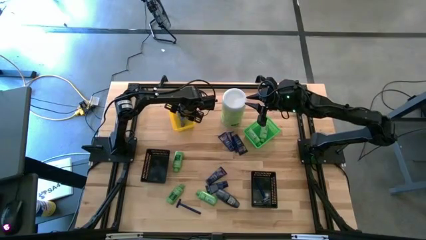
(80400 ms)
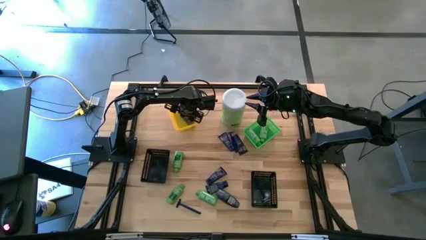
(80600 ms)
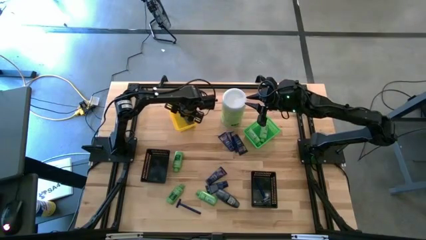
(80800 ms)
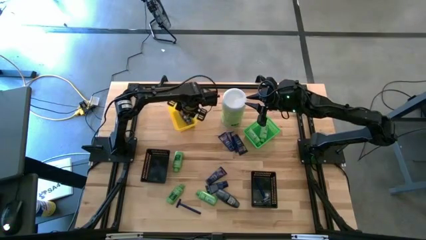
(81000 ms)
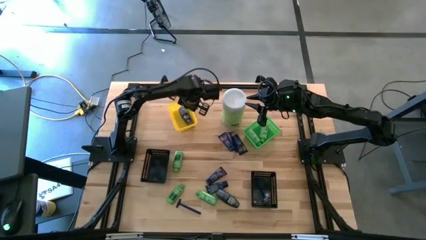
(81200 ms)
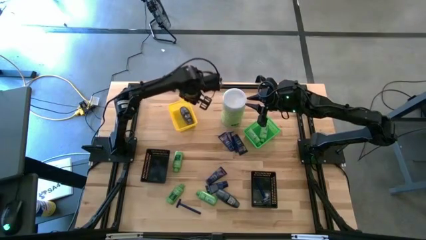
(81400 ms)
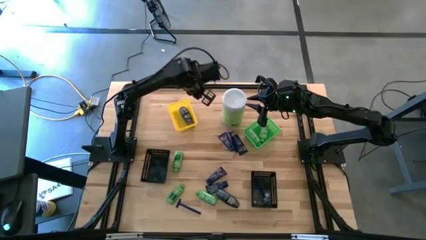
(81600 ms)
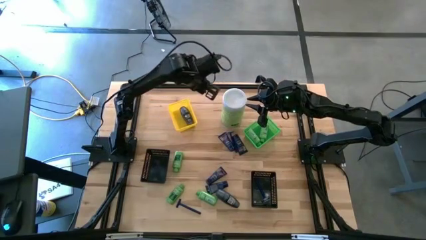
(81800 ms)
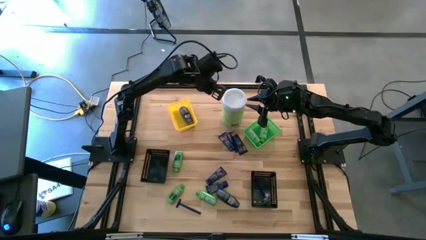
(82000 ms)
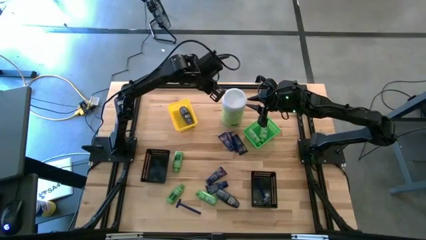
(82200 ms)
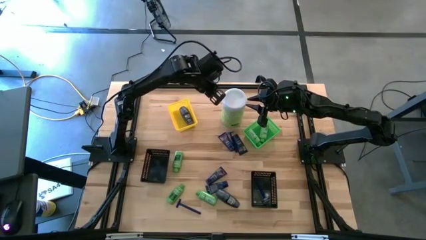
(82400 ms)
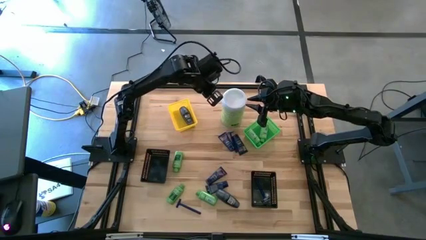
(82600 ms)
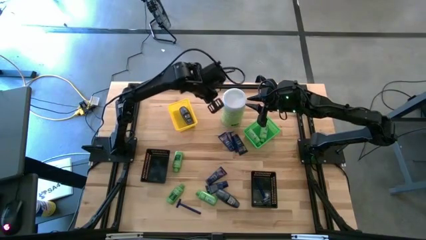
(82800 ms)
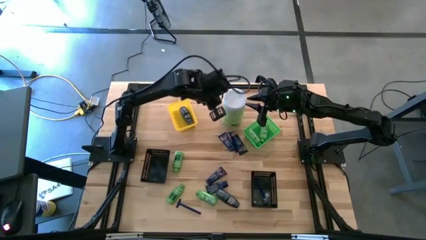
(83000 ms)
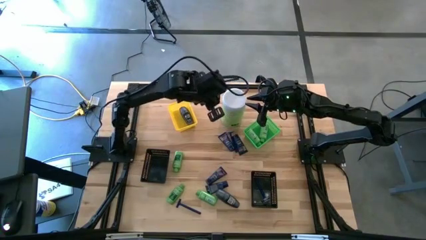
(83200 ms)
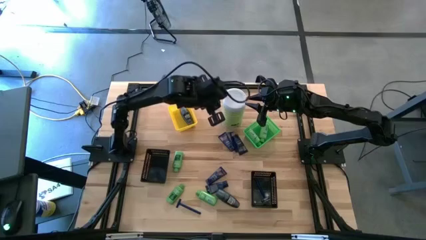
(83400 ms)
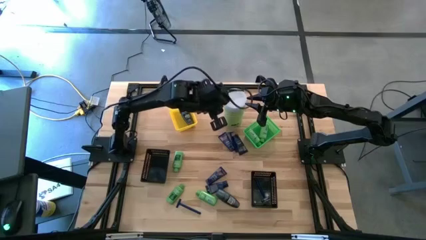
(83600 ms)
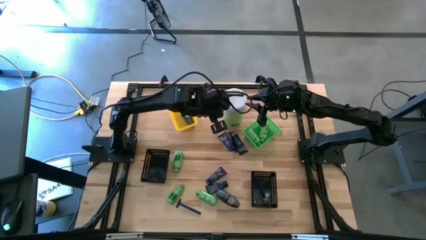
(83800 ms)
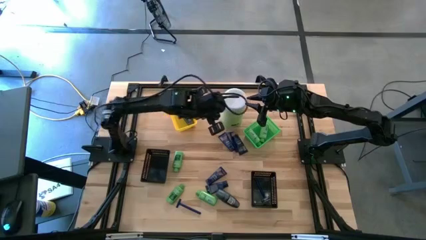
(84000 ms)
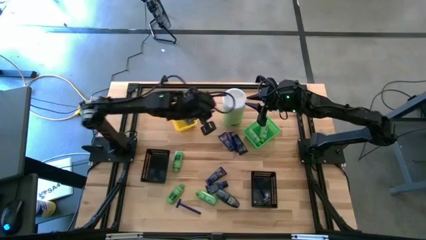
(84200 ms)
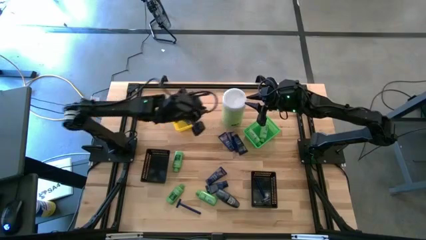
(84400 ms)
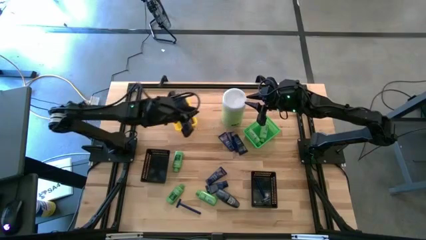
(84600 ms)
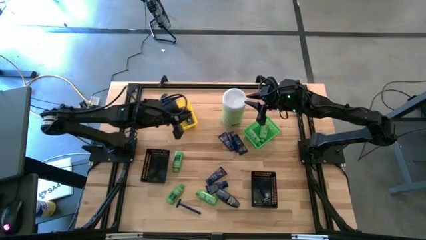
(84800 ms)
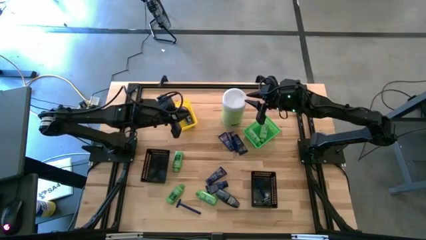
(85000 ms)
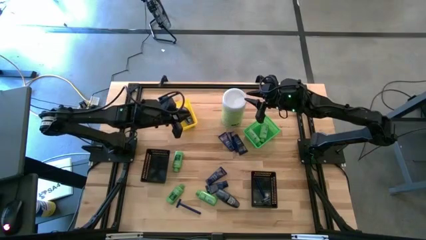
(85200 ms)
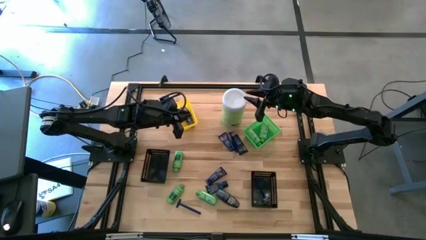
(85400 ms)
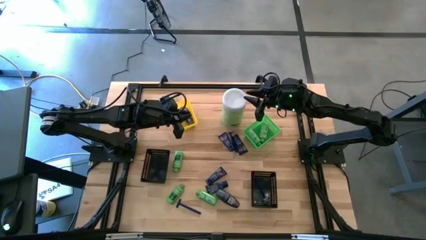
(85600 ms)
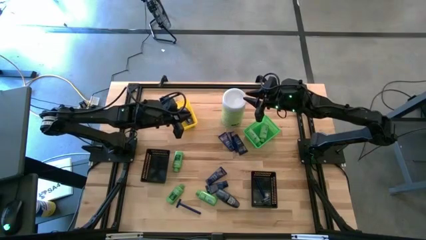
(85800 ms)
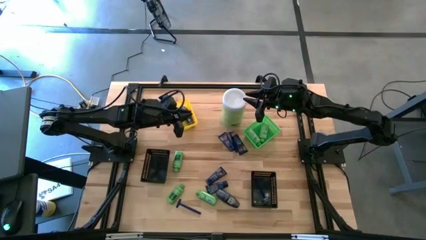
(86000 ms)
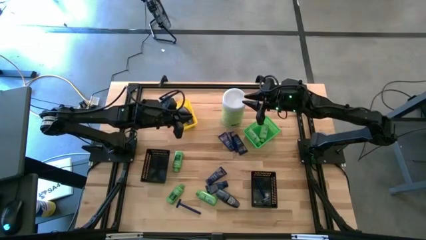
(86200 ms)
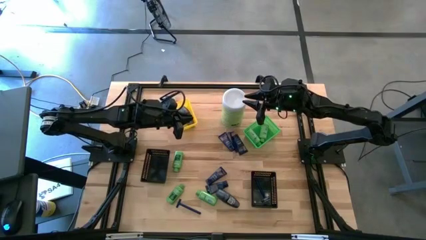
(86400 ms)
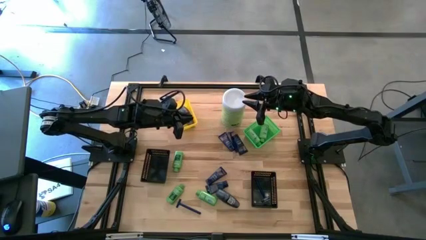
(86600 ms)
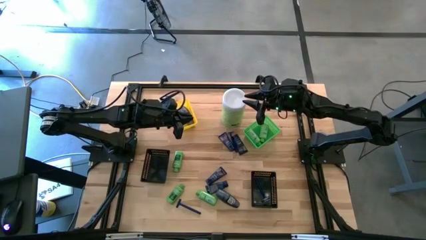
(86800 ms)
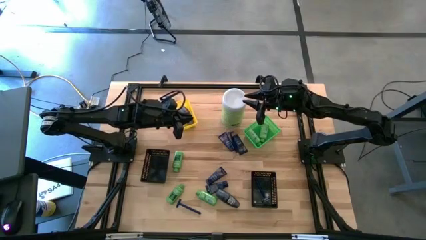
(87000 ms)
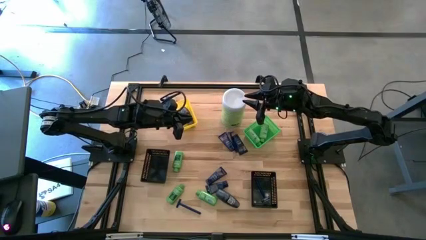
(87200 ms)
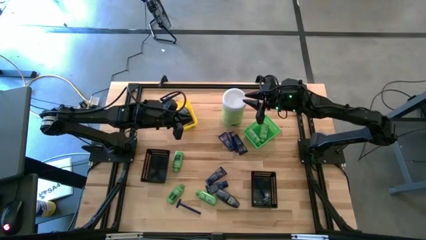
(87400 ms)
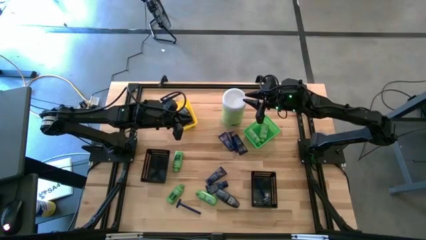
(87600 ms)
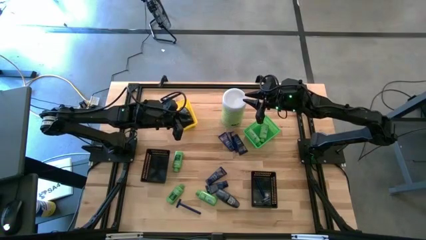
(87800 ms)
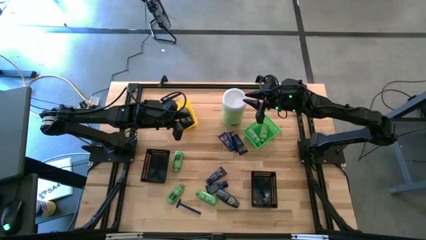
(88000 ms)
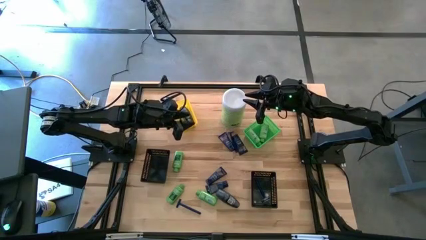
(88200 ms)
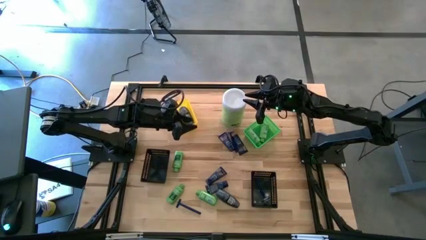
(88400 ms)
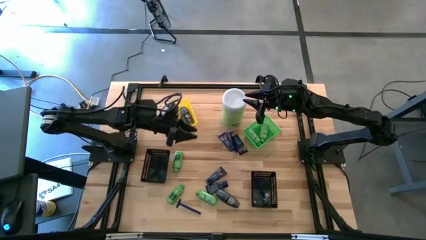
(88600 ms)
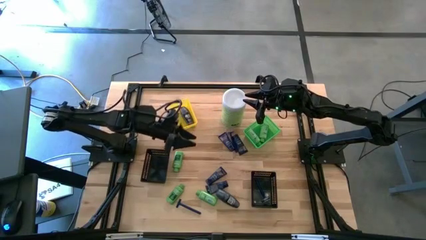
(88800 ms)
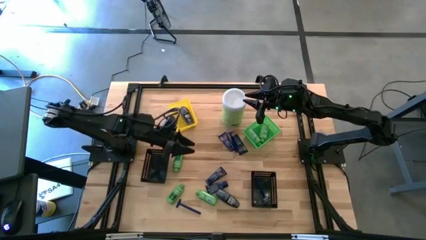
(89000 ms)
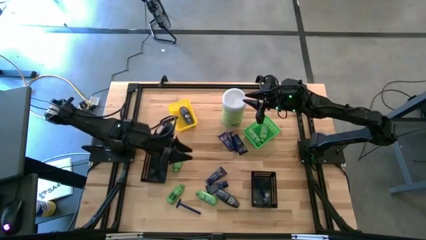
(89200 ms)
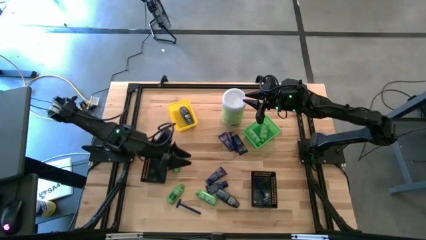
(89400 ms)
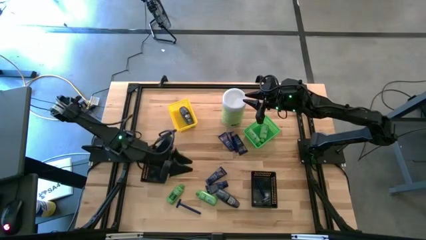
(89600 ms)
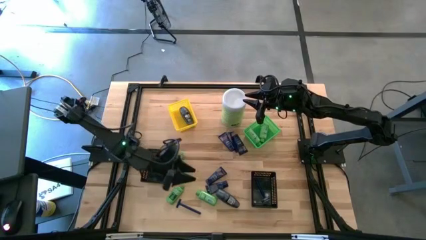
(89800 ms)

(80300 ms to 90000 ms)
Task: Pick & Place Travel size toiletries
Put the bottom blue razor into the right black bin

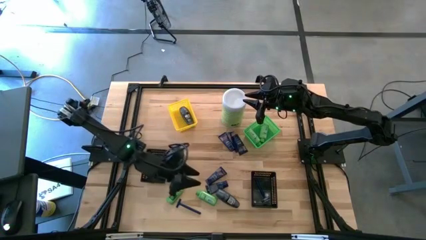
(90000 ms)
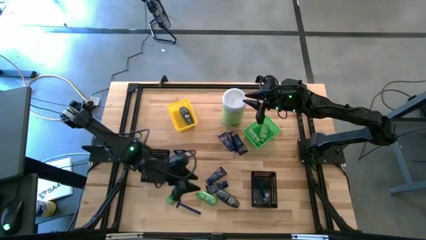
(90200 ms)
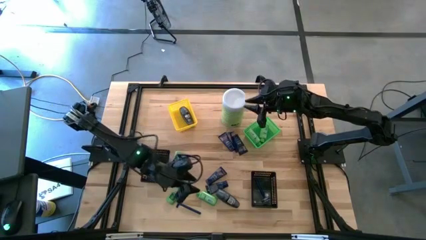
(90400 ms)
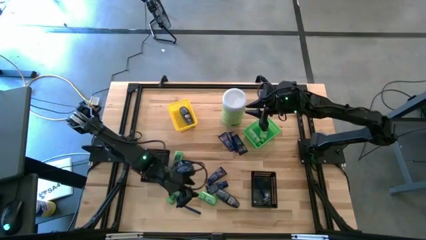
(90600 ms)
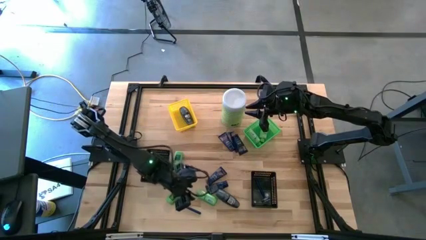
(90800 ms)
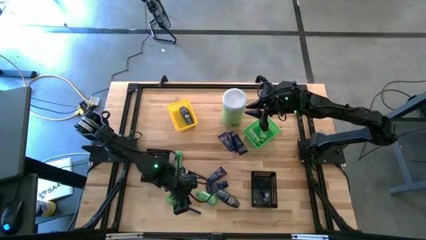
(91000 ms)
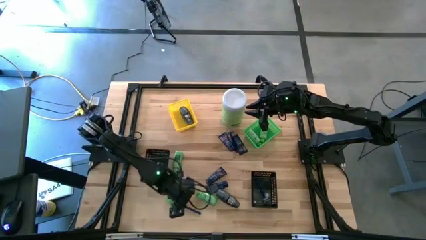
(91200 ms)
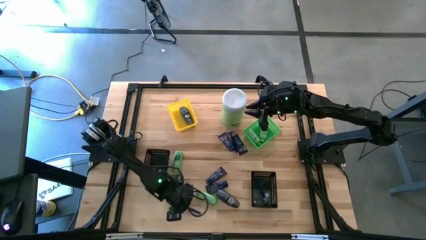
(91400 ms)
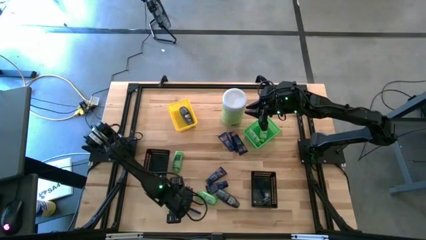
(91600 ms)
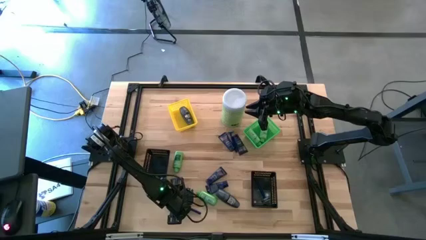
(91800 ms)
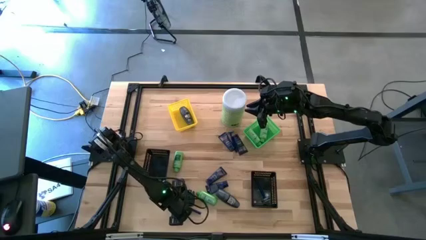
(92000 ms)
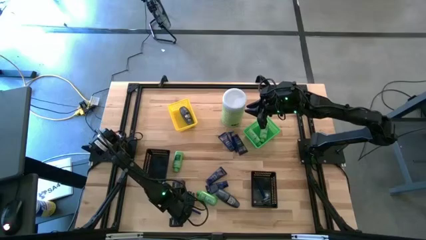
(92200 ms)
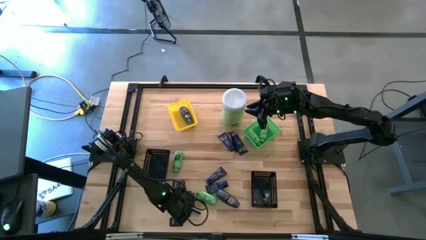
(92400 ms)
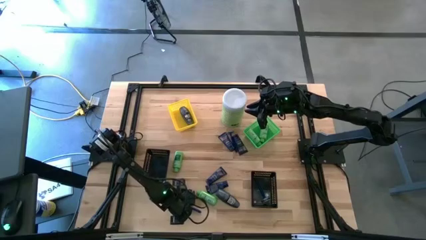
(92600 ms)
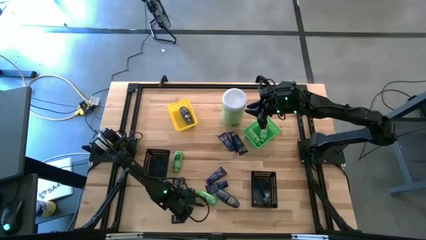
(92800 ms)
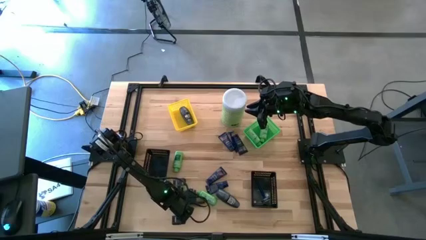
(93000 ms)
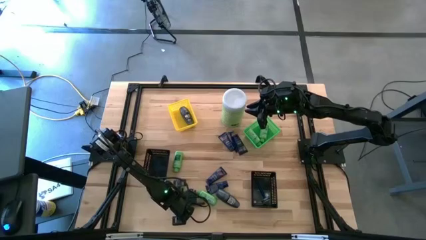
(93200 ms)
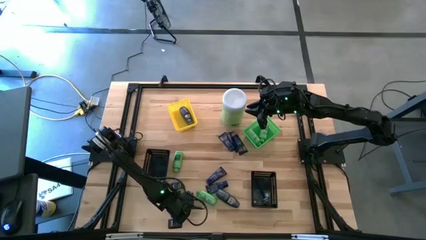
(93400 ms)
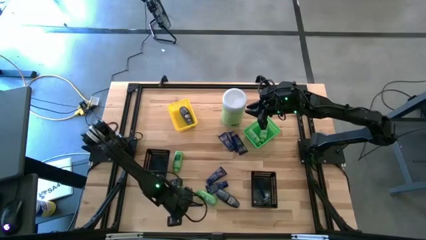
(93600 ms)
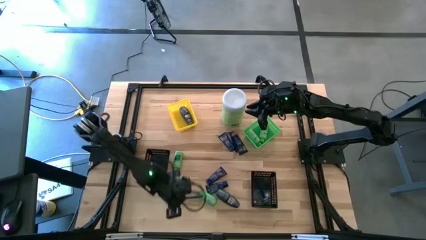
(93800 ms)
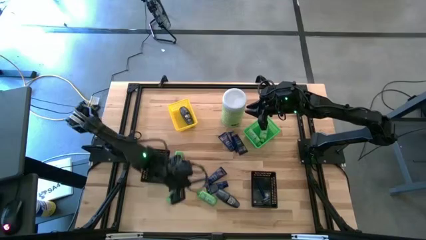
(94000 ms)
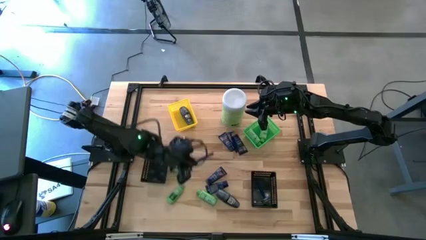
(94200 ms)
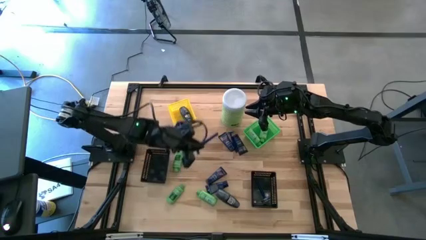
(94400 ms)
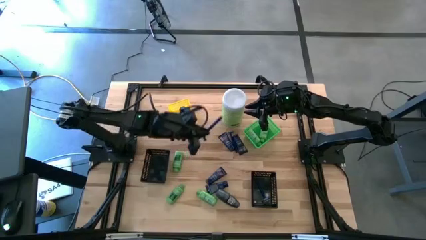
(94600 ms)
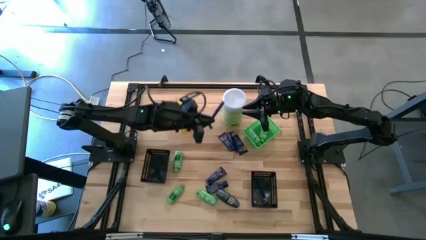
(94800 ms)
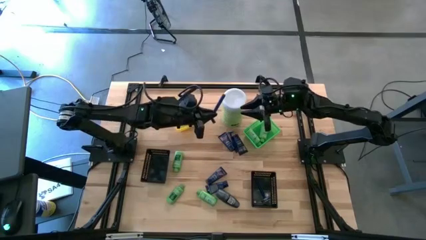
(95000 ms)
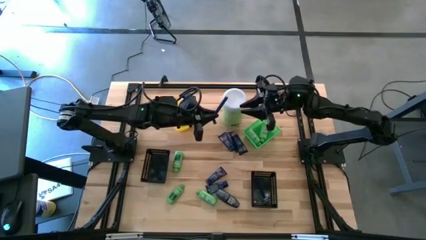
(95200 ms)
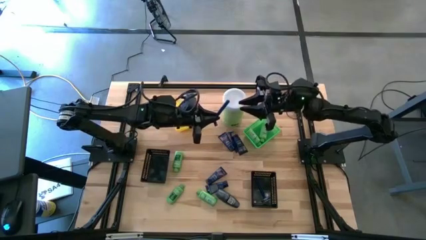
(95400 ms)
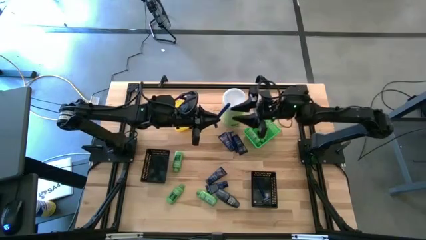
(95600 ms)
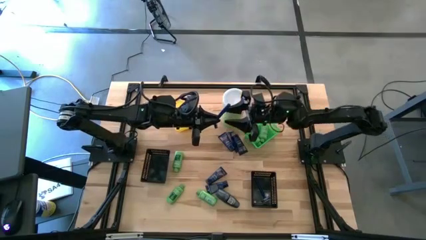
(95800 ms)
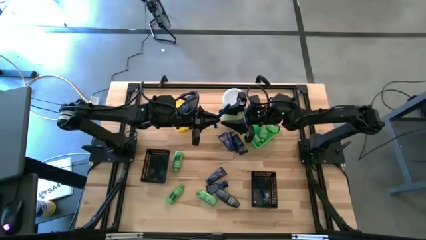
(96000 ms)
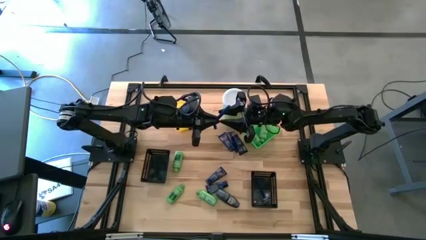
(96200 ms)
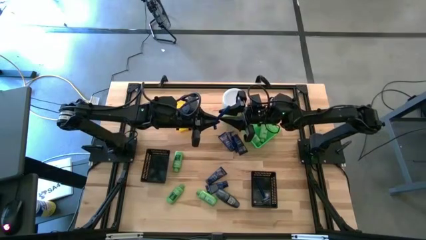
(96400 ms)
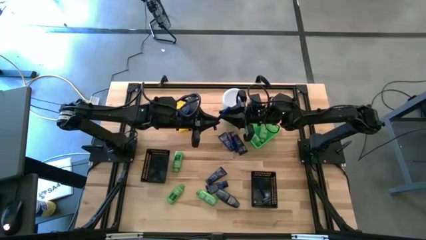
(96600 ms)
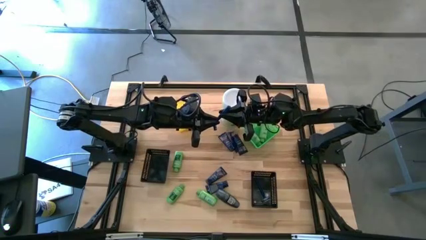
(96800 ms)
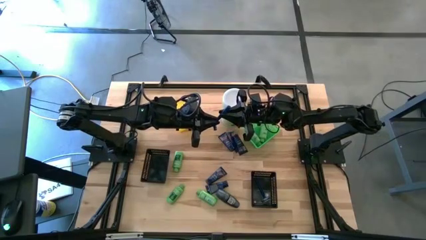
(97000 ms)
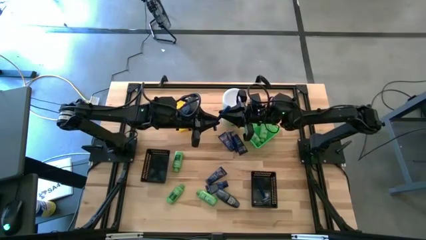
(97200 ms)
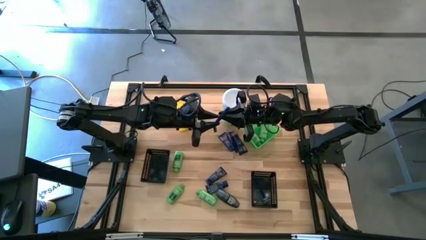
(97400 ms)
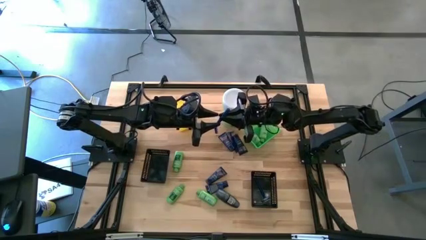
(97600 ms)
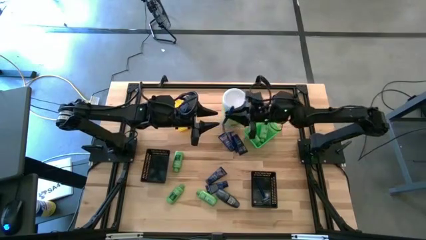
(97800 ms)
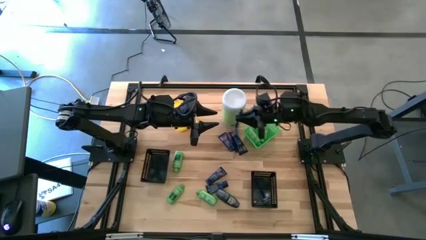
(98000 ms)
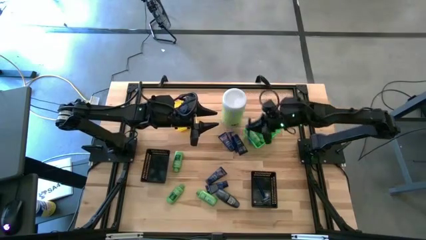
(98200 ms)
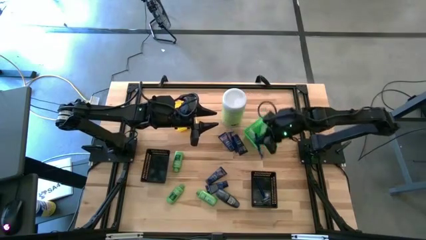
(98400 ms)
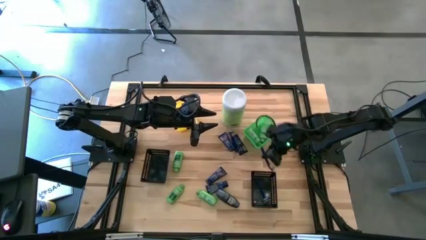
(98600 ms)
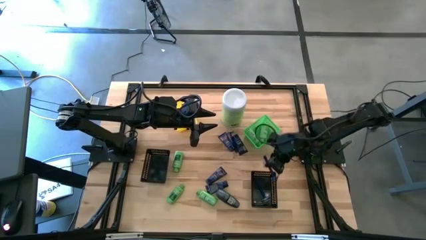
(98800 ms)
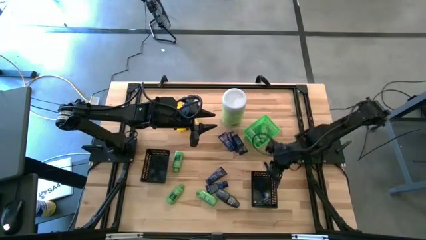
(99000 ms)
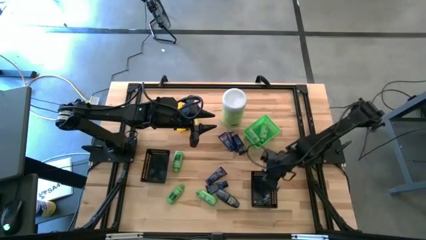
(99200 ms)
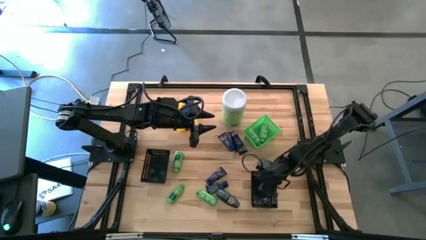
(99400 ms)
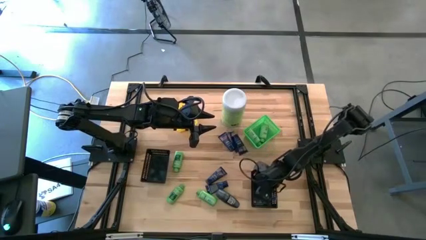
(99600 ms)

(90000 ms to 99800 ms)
Put the bottom blue razor into the right black bin
